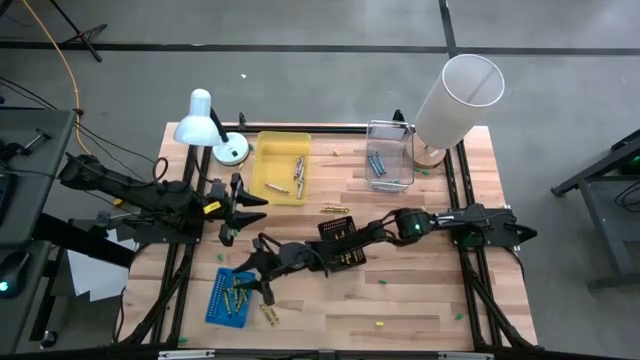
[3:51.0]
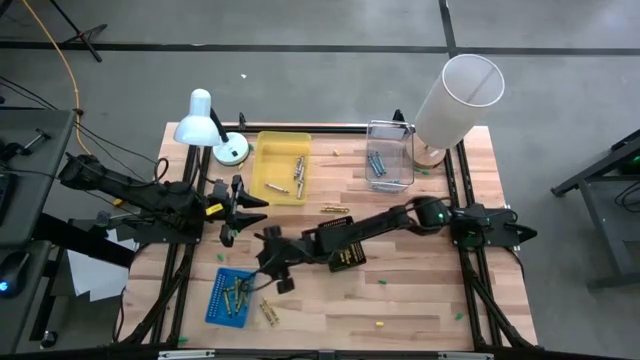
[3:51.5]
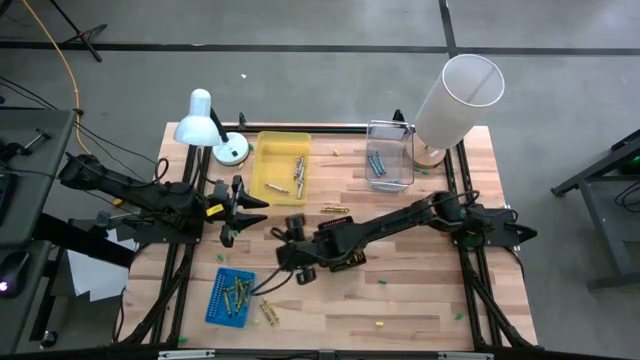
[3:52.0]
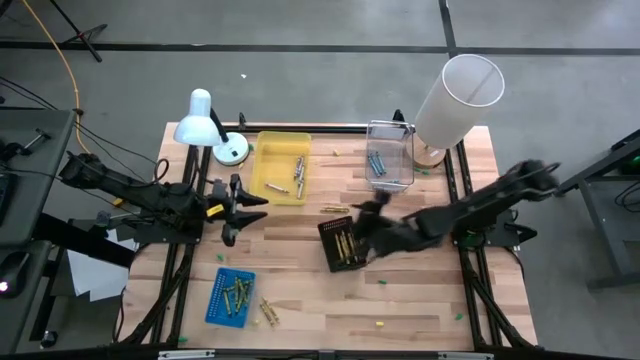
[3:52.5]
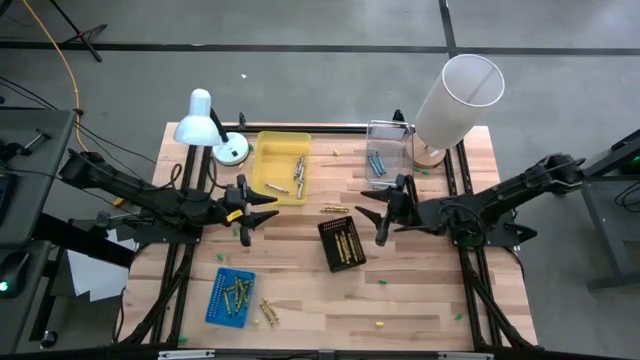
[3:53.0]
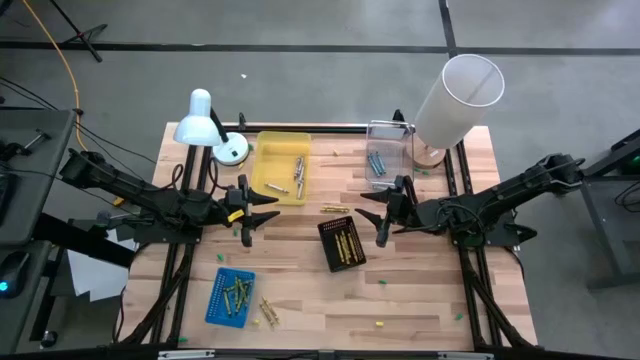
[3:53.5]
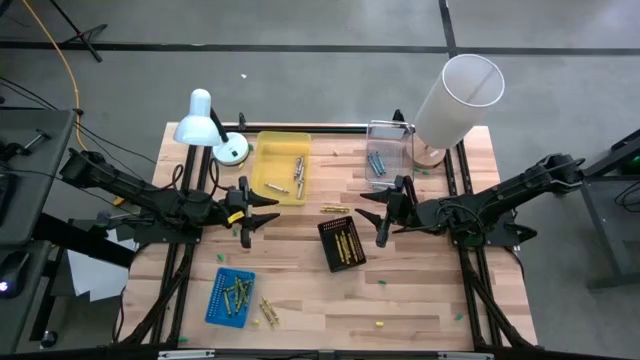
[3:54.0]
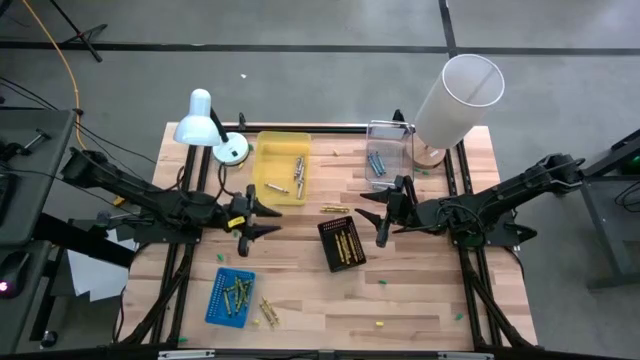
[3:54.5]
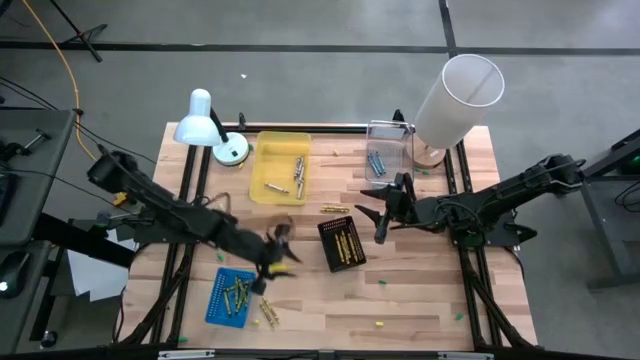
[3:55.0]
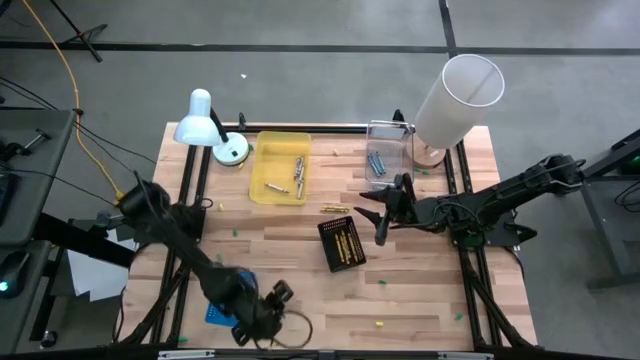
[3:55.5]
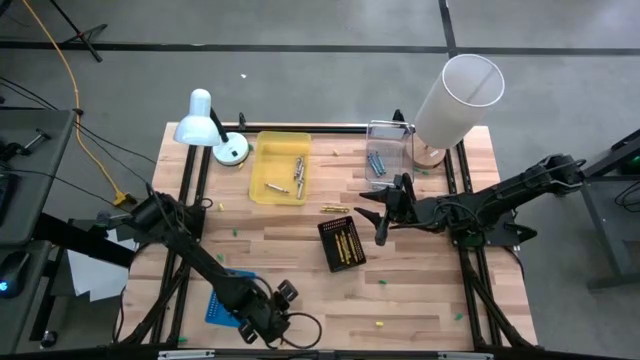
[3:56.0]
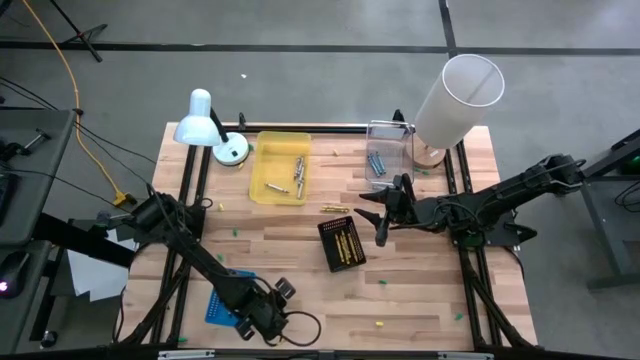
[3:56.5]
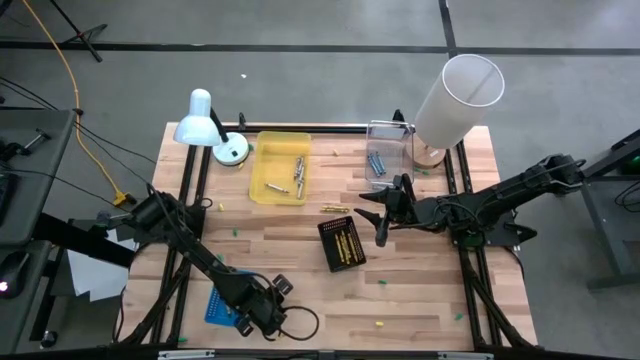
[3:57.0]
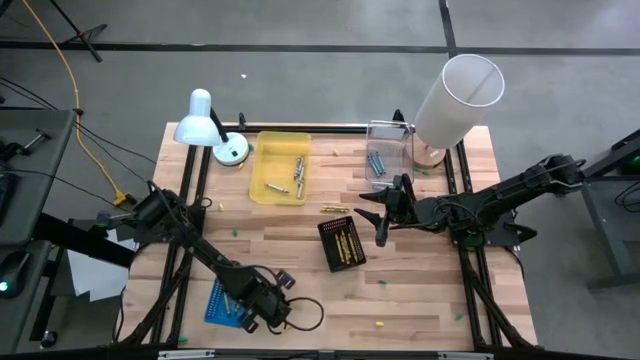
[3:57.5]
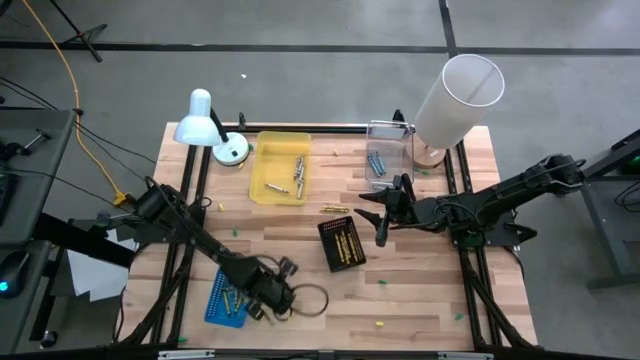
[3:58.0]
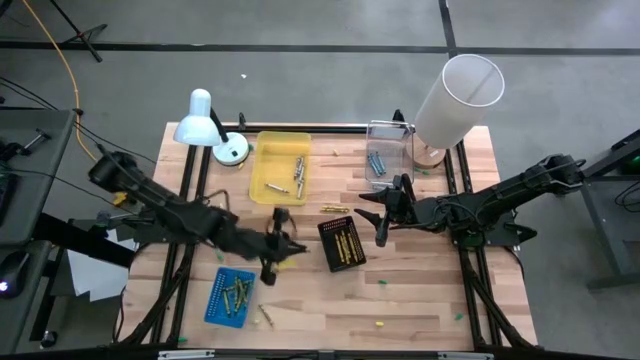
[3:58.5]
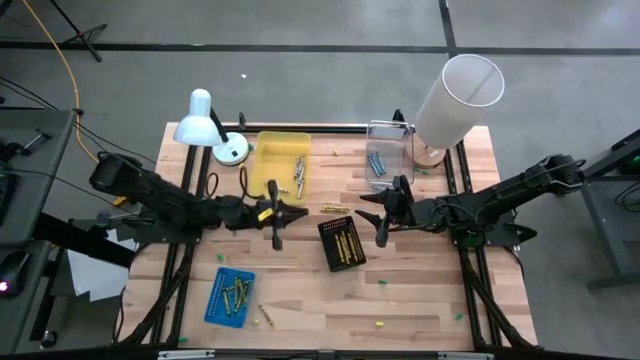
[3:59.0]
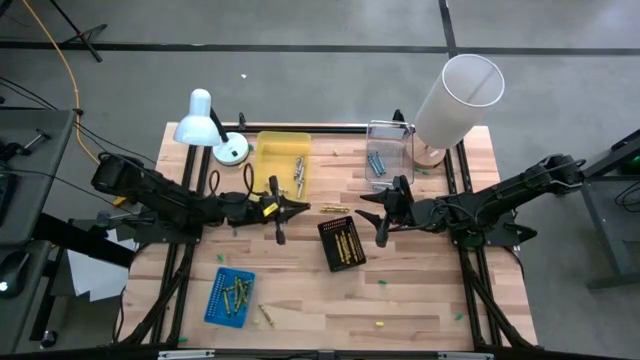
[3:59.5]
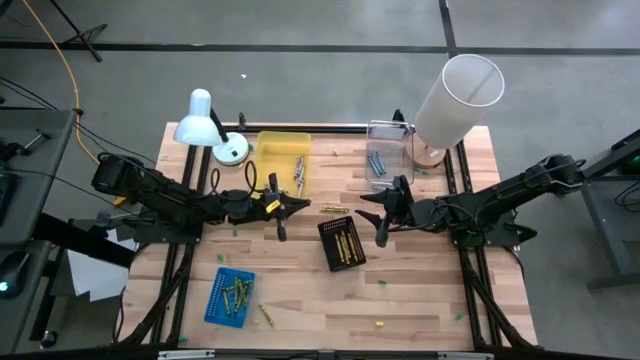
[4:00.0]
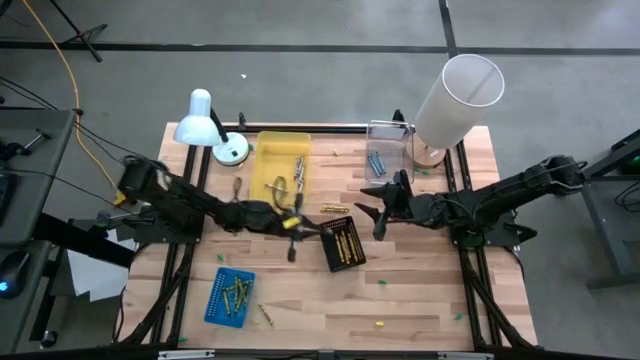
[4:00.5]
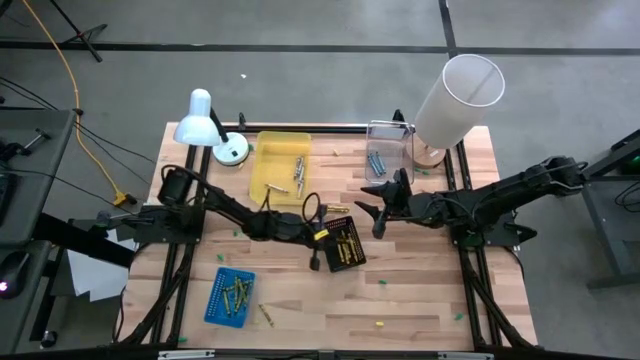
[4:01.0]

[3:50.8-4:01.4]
Task: Sort crayons
Put the yellow crayon into the black bin

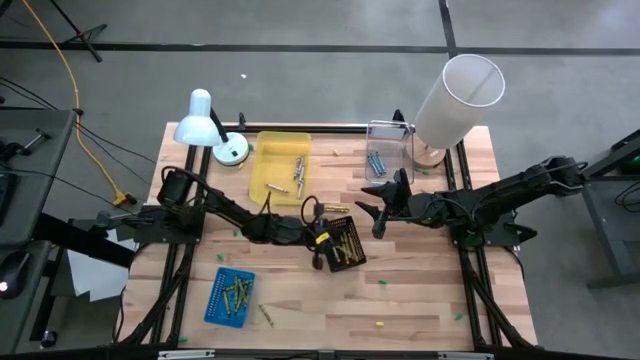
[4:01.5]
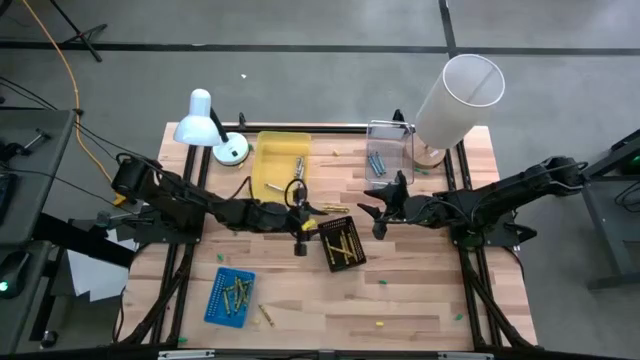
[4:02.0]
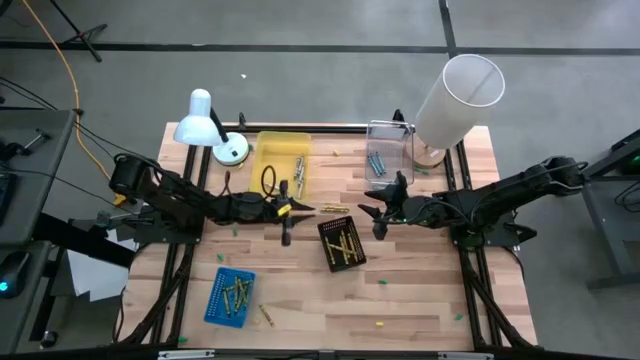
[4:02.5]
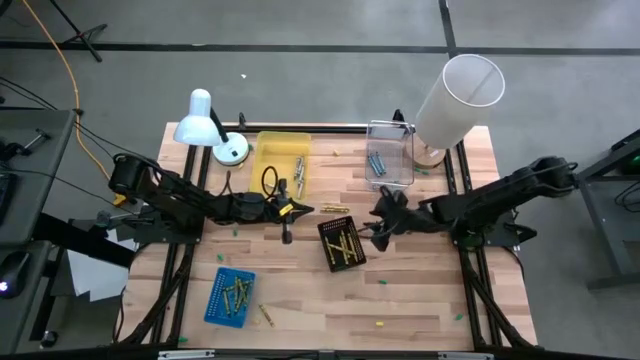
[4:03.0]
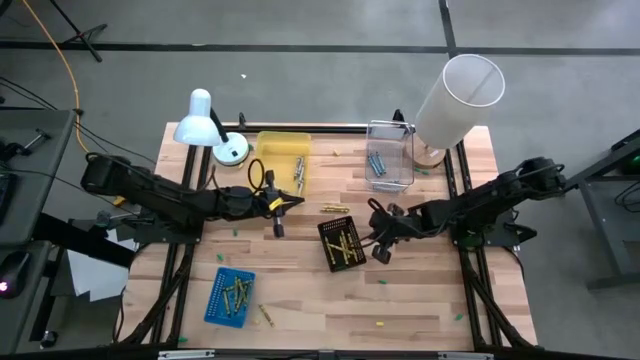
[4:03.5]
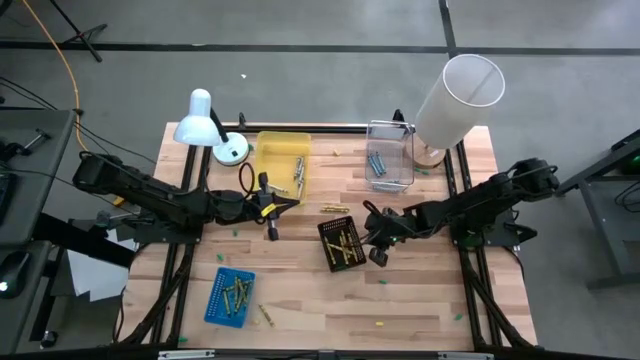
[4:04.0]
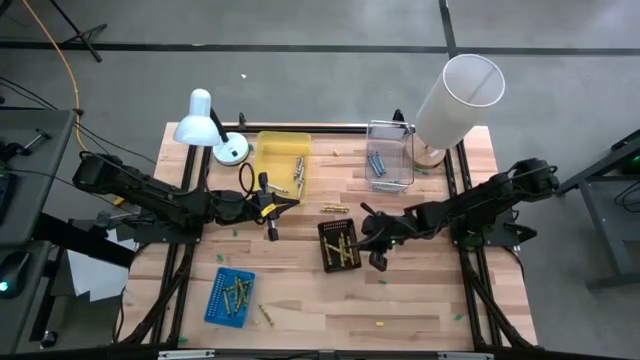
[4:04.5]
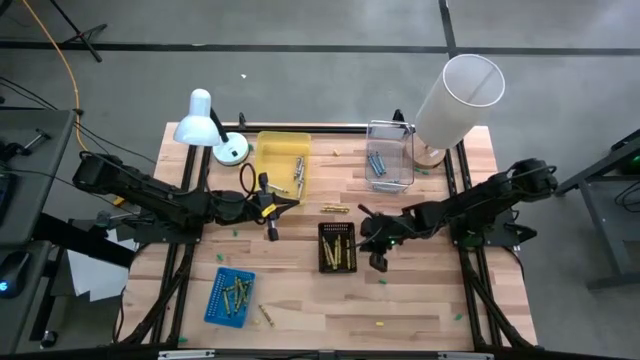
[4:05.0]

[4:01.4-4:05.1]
Adjust the black bin

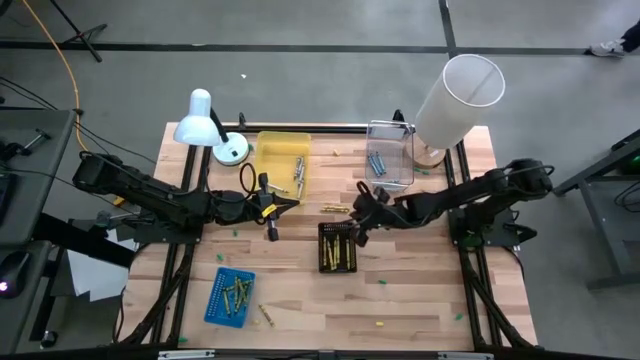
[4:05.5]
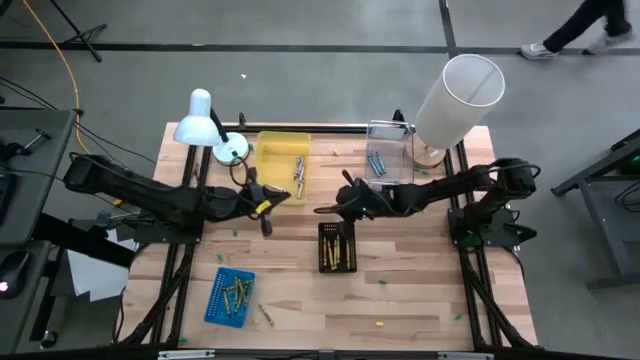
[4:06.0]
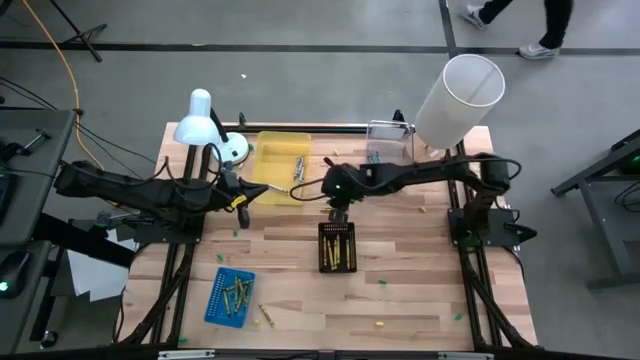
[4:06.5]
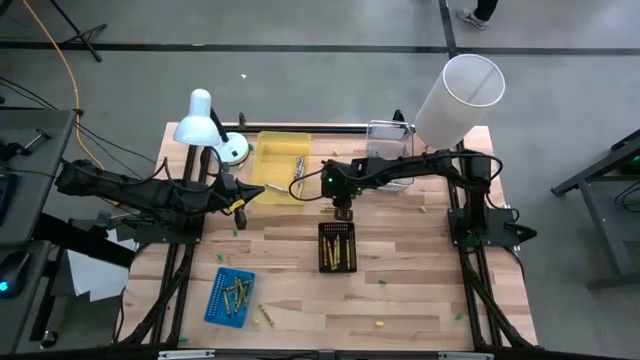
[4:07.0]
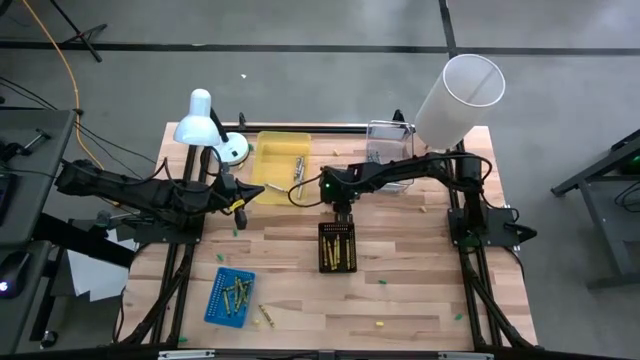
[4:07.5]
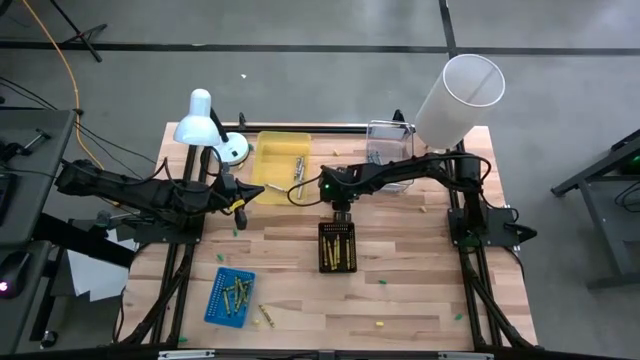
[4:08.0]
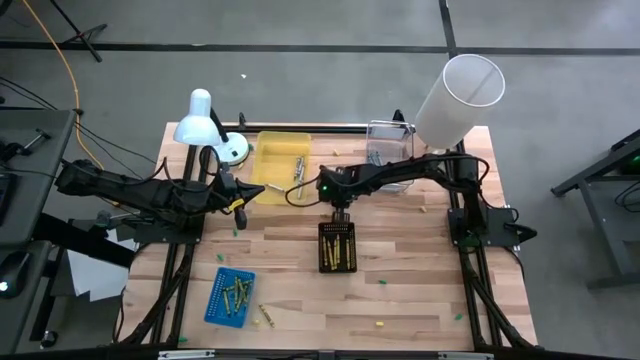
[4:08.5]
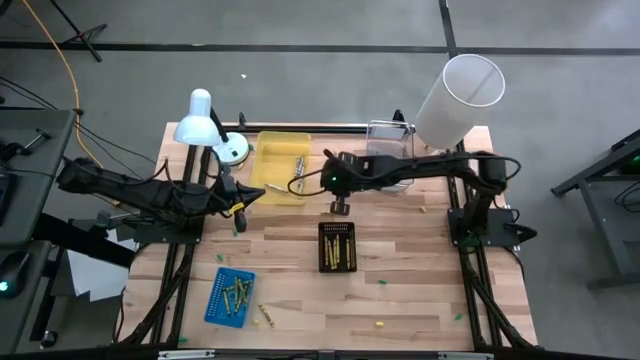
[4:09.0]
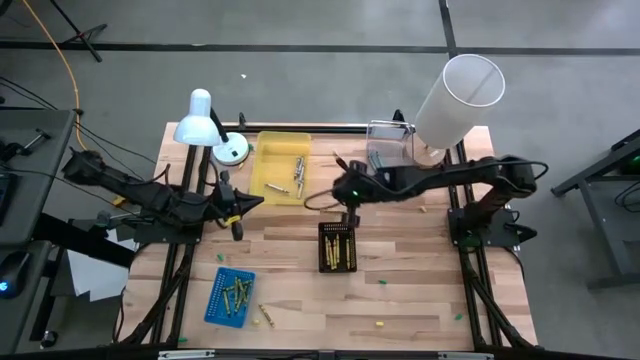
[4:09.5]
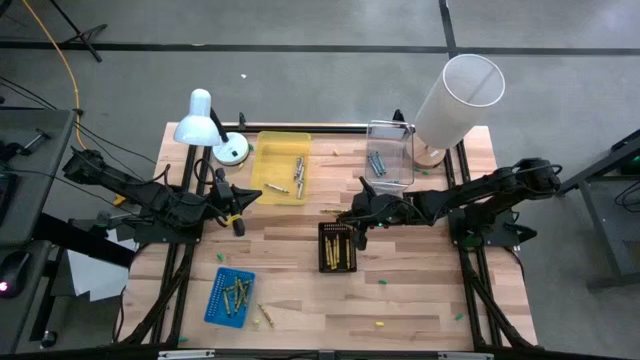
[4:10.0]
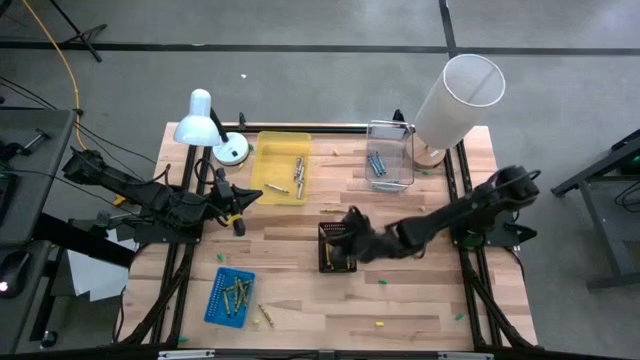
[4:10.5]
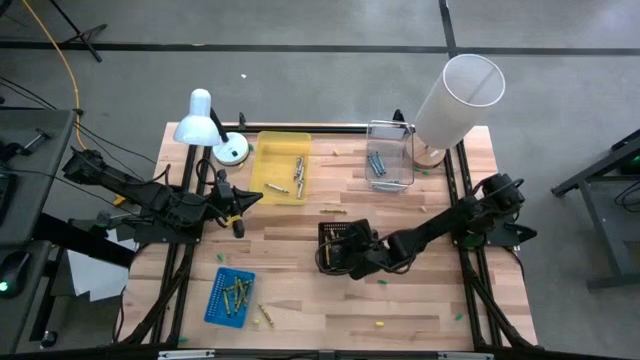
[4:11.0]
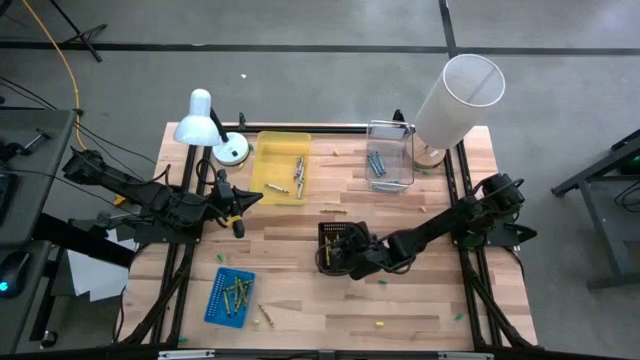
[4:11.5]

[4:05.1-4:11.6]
Put the yellow crayon into the black bin

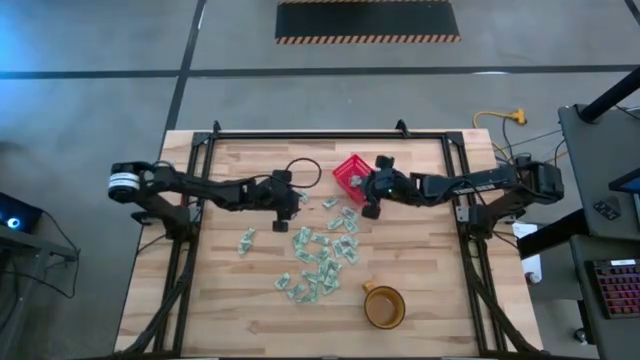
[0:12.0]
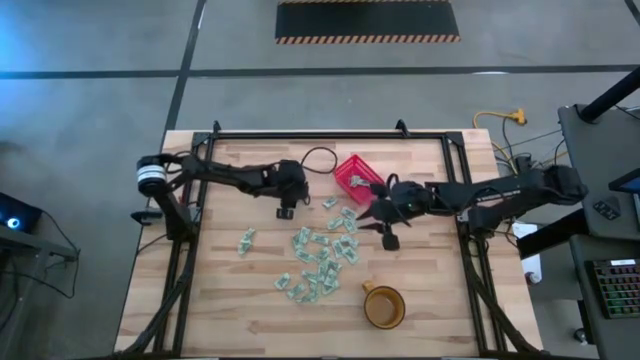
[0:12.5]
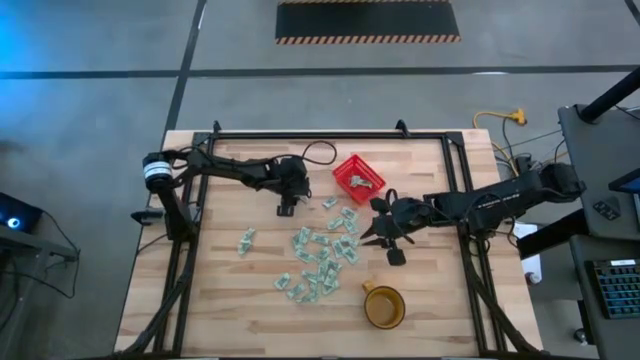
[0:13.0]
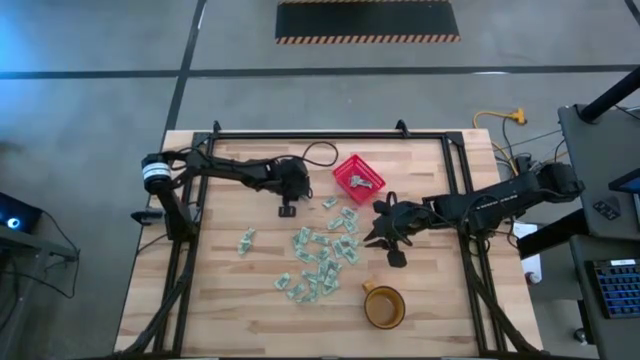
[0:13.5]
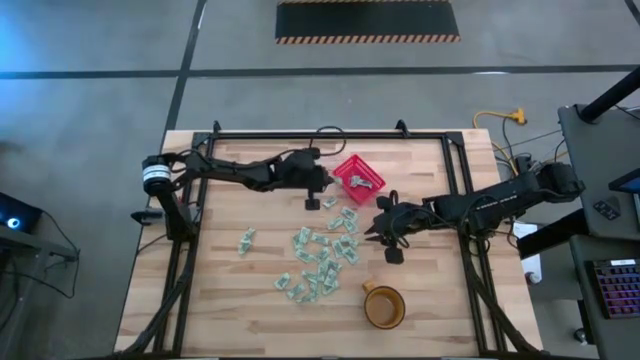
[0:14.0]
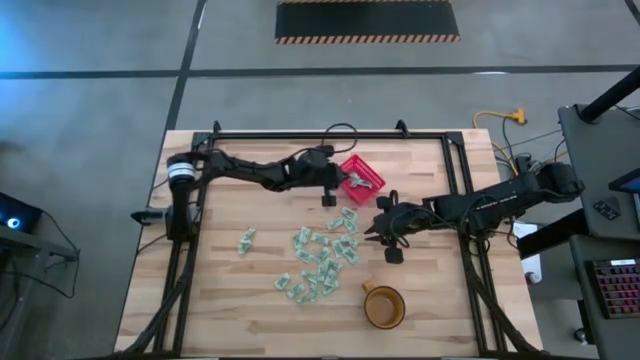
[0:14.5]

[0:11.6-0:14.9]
Task: Pick and place Stevia / Truvia into bins
Put the stevia packet into the red basket
